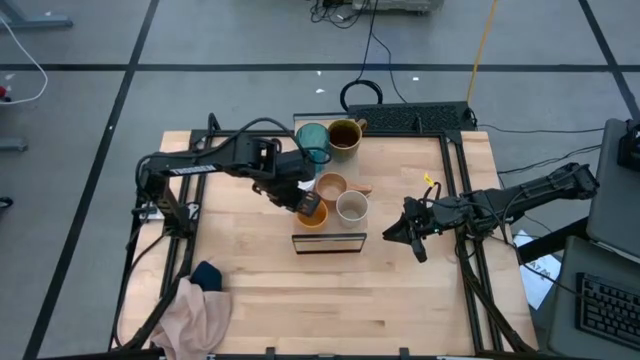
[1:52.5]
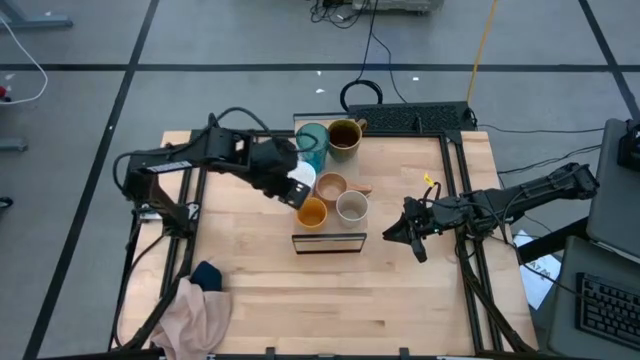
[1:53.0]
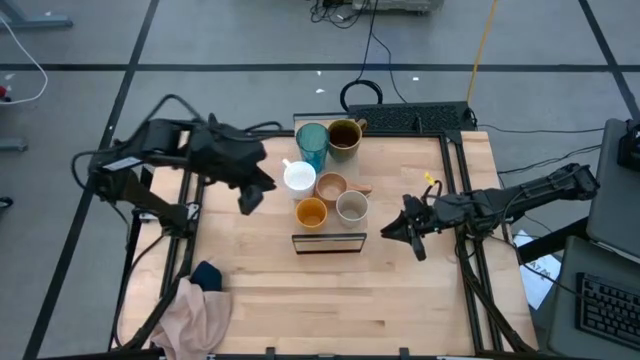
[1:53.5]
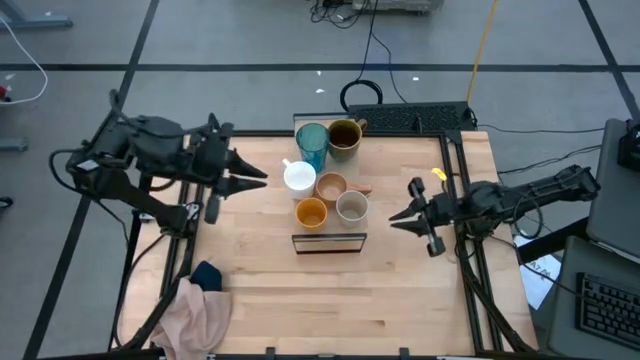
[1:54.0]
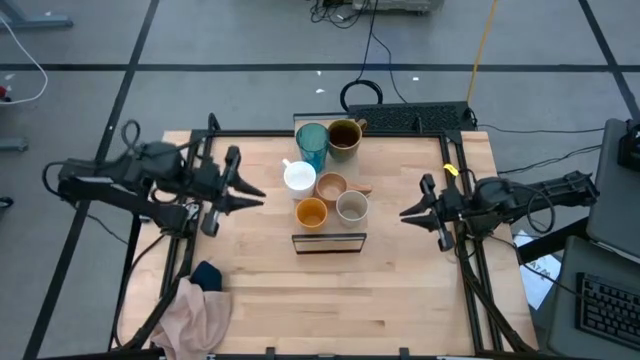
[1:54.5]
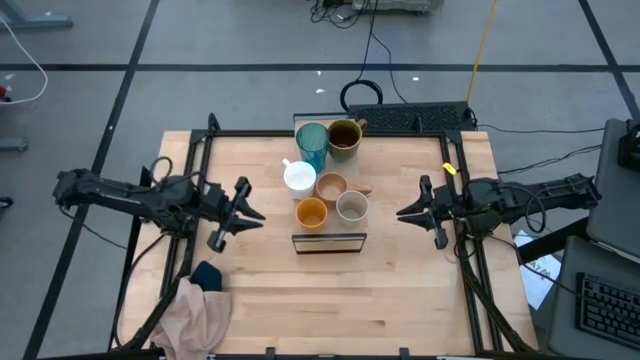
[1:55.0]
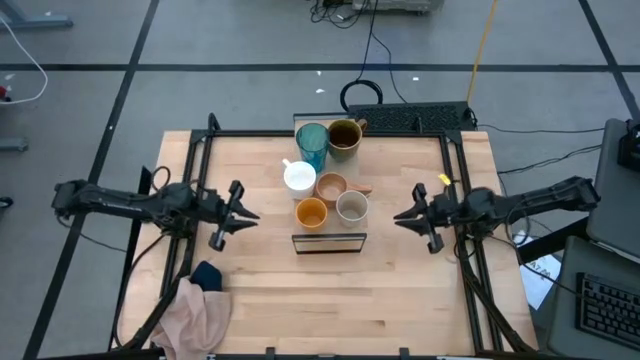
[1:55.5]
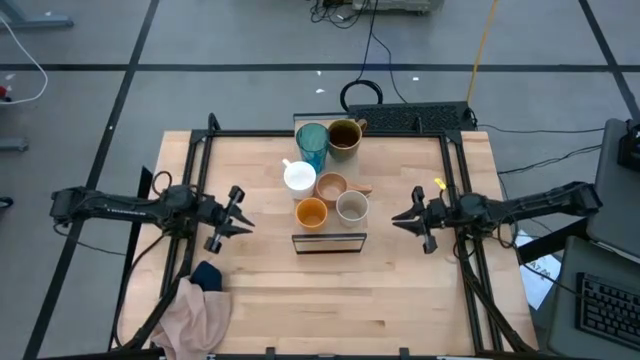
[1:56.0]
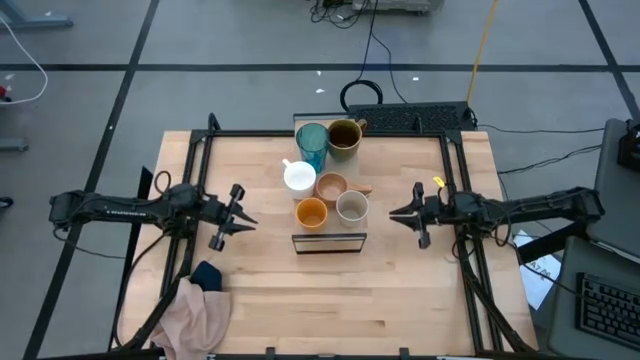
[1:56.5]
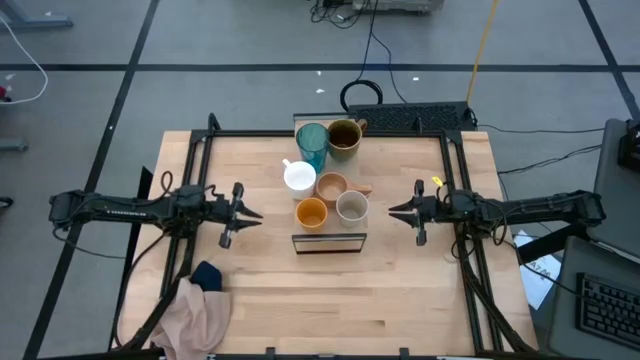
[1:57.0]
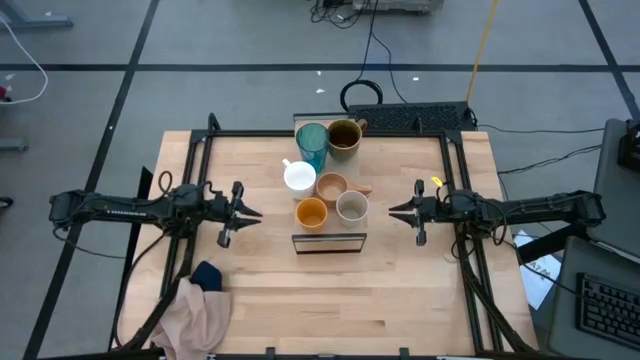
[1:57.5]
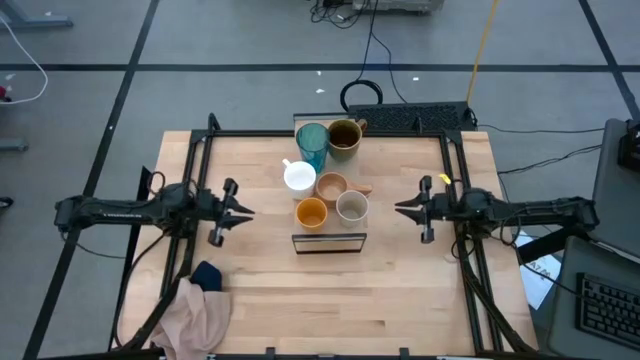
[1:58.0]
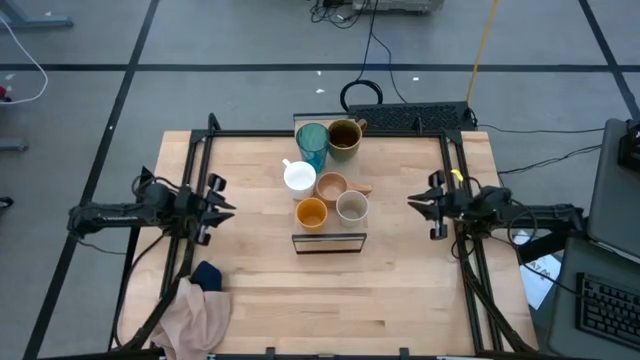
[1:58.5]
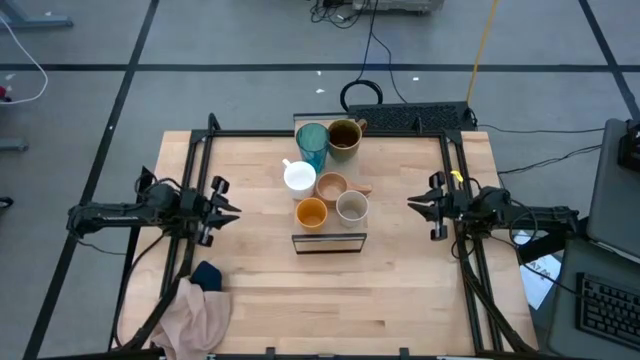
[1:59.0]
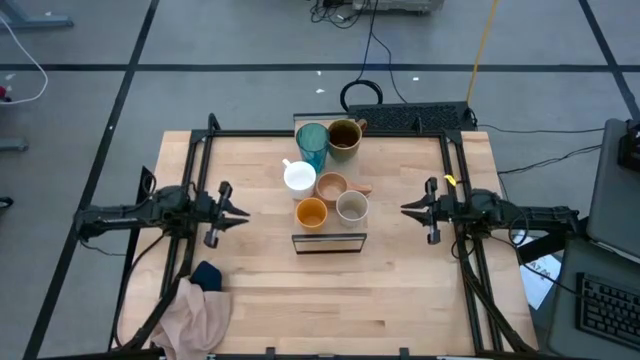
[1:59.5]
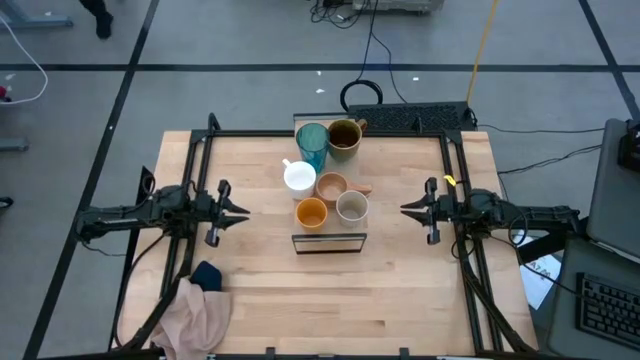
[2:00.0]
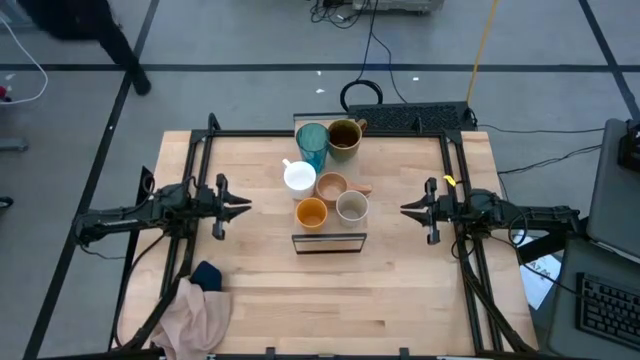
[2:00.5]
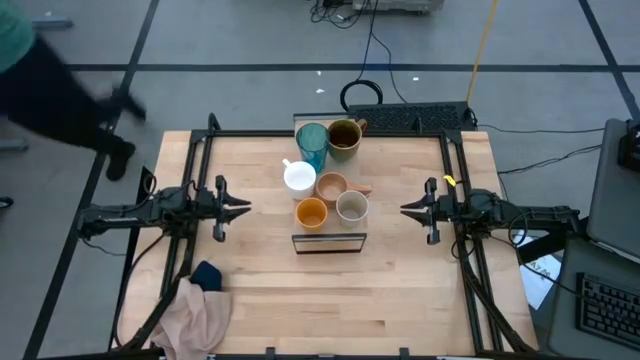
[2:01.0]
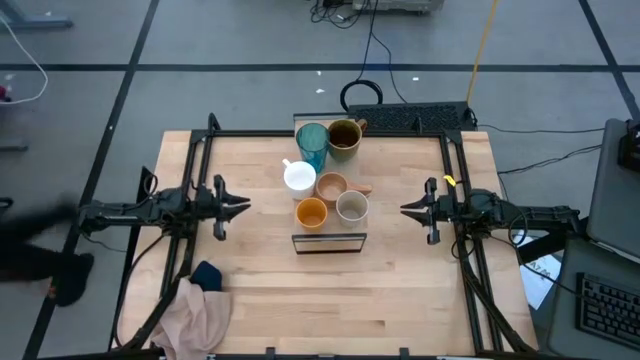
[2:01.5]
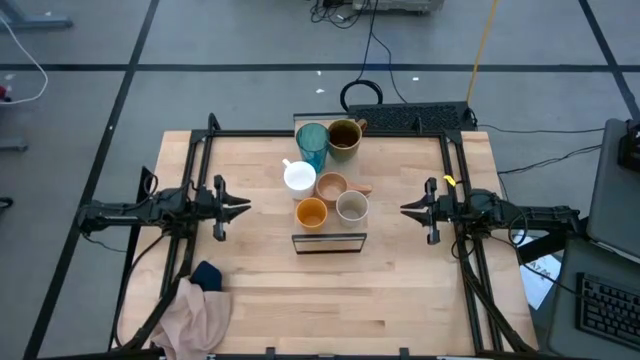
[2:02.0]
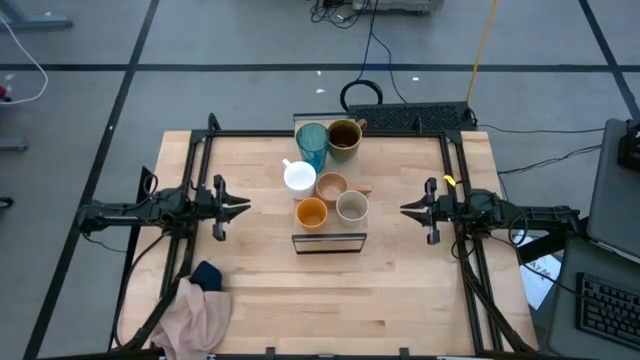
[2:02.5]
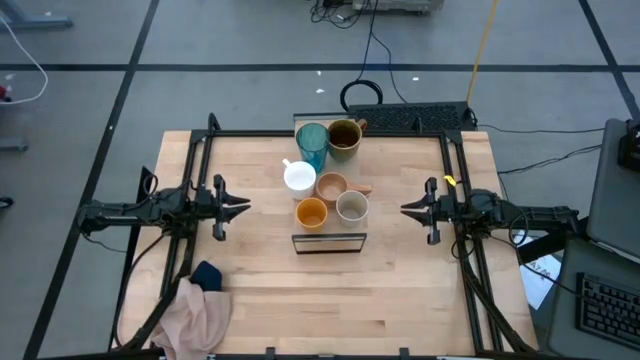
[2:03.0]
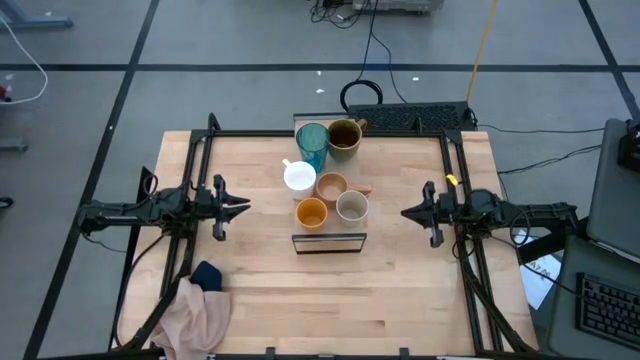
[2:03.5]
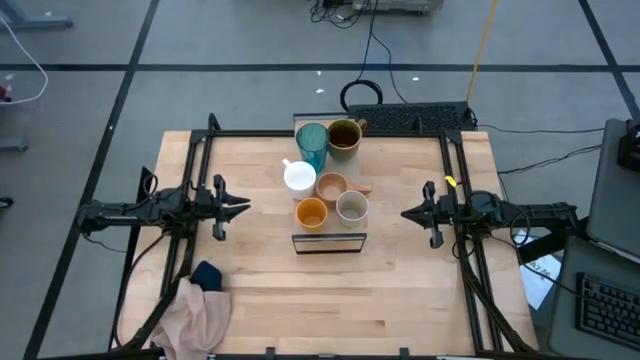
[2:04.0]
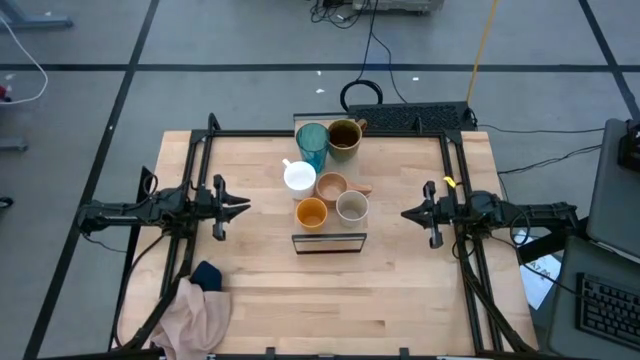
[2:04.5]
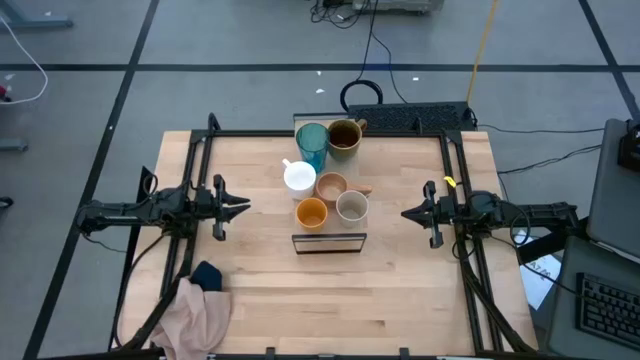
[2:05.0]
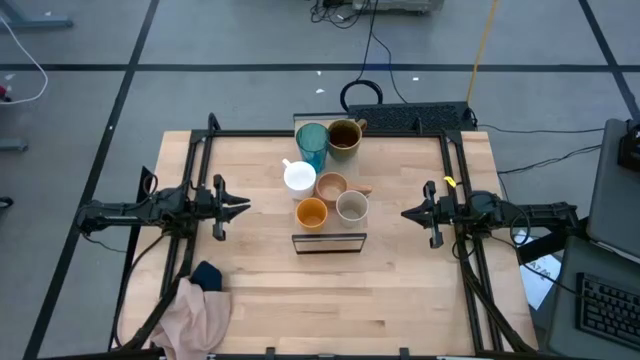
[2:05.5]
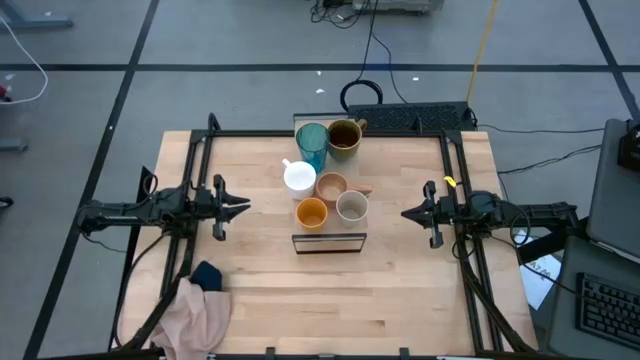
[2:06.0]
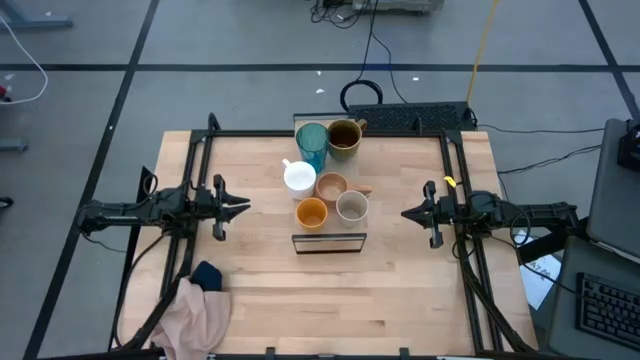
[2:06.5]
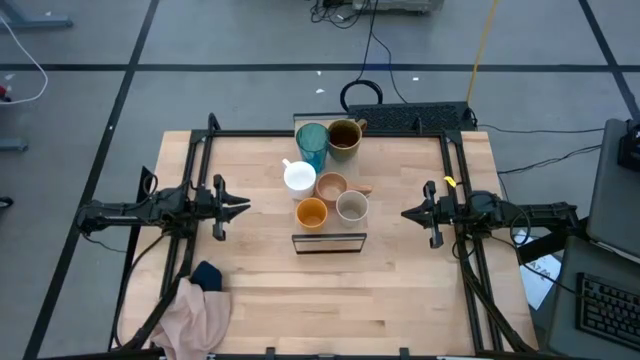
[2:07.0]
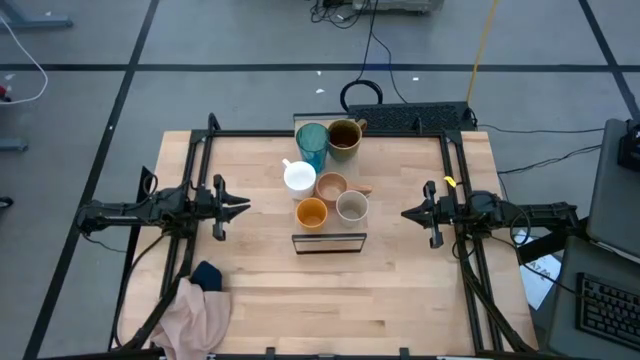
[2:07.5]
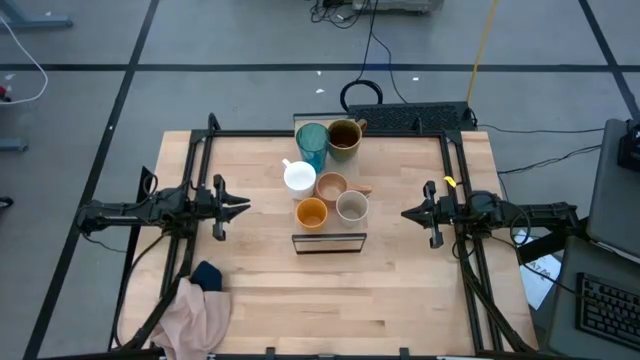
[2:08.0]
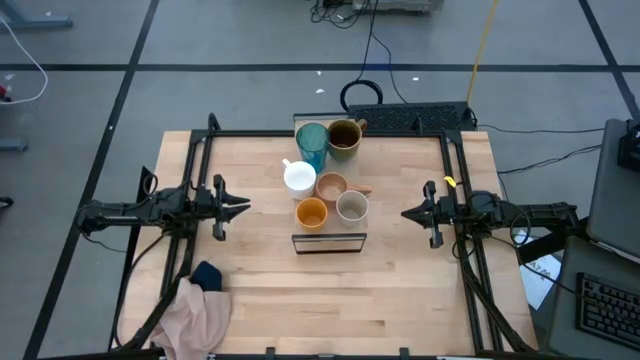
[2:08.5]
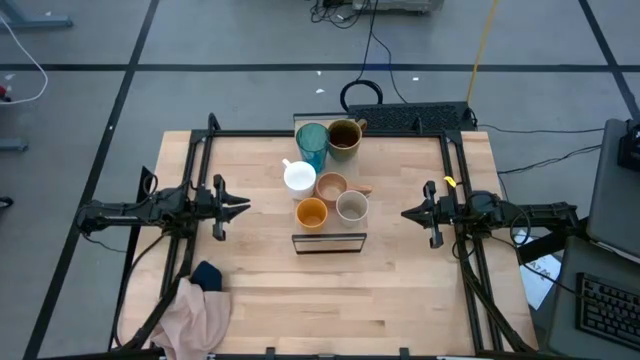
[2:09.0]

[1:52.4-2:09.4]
Task: Stack small to large cups/mugs on shelf
Return to Home Position

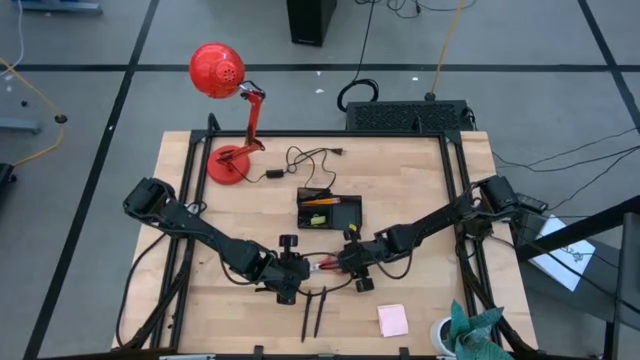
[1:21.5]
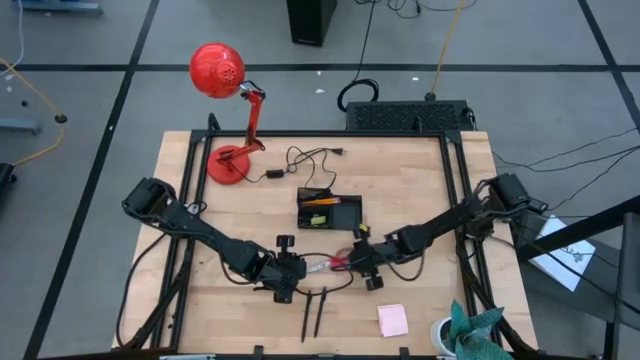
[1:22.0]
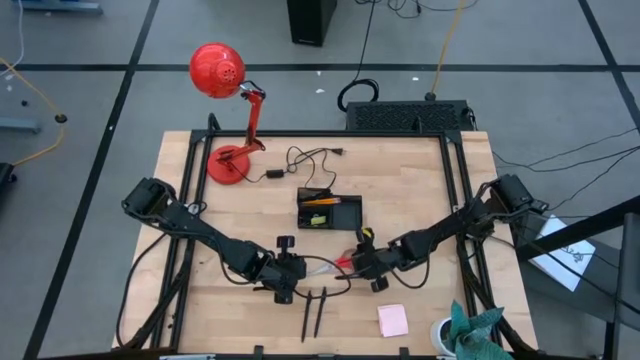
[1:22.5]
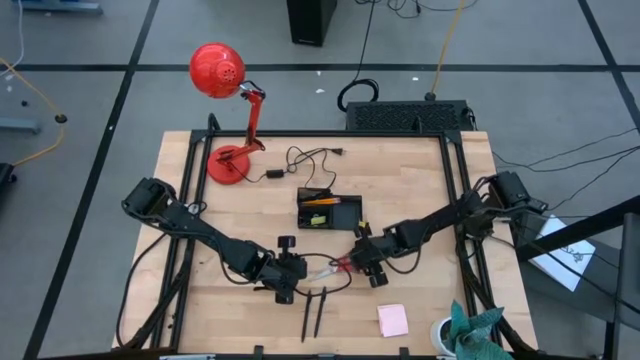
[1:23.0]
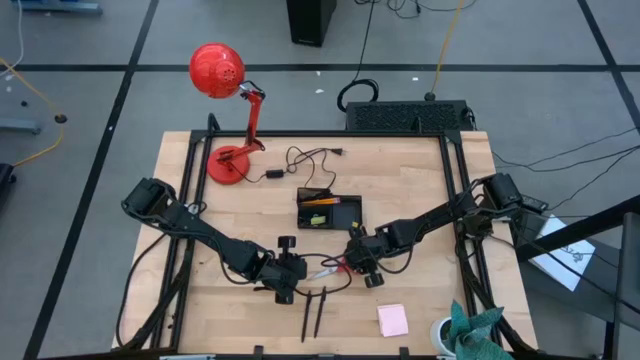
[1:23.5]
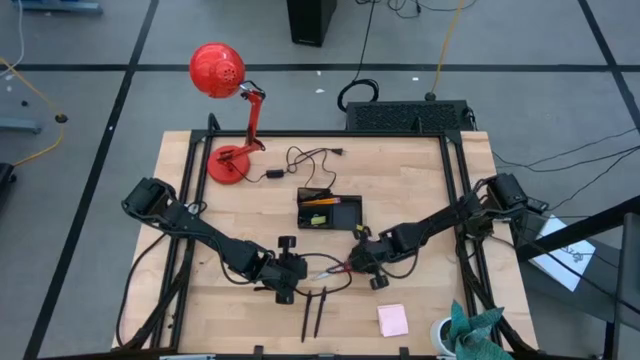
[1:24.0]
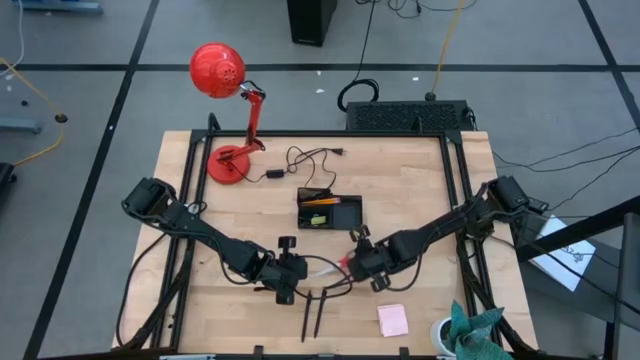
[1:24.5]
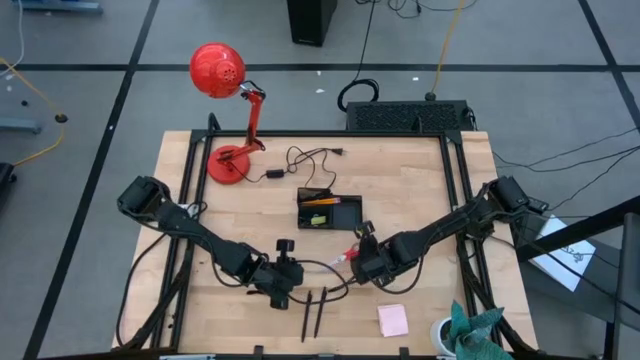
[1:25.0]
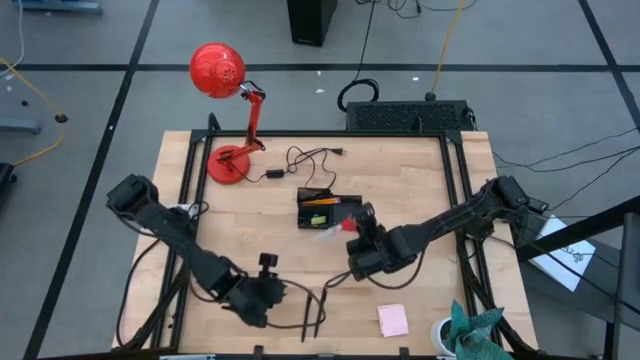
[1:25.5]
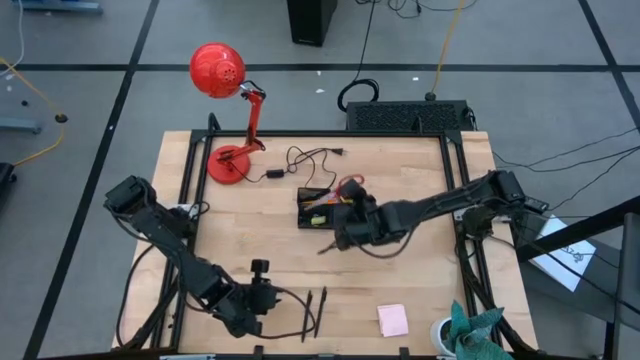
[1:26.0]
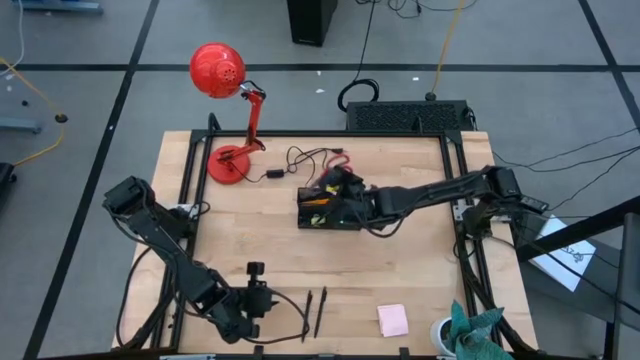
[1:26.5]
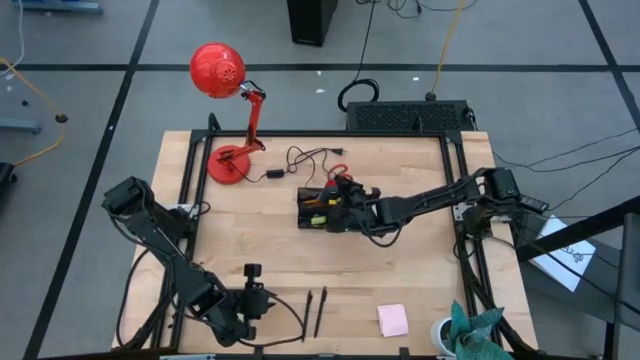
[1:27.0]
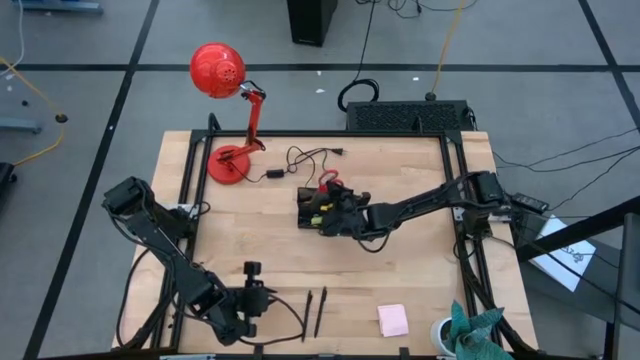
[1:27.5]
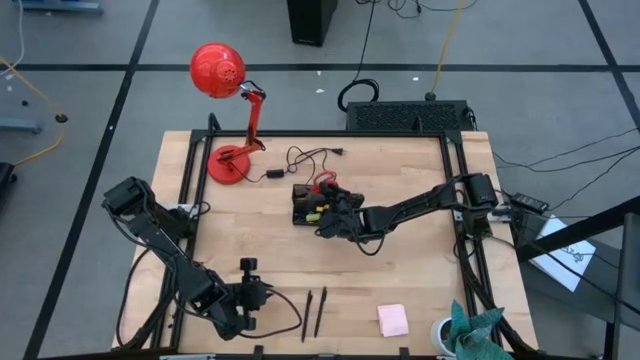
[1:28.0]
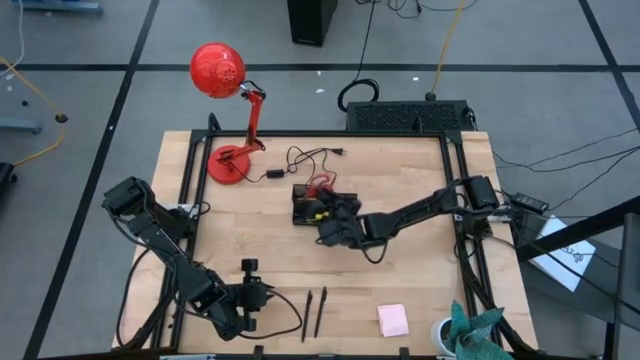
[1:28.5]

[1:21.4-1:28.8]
Task: Pick and place office supplies into organizer
Put the red scissor into the black desk organizer
